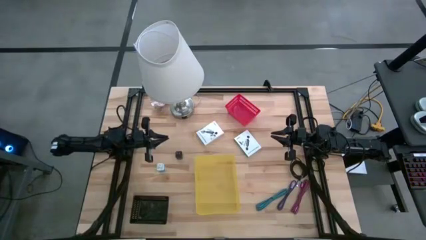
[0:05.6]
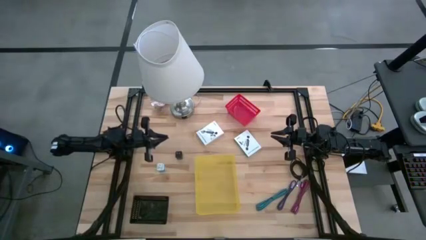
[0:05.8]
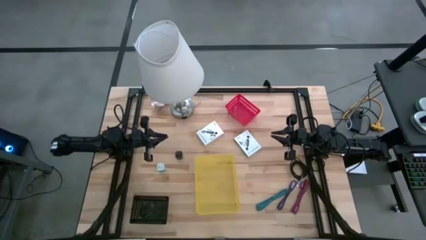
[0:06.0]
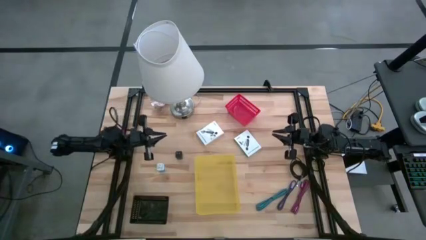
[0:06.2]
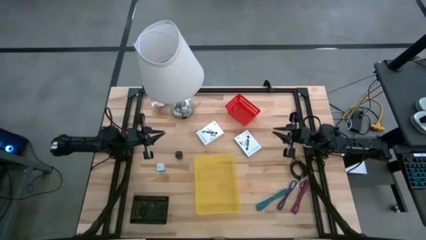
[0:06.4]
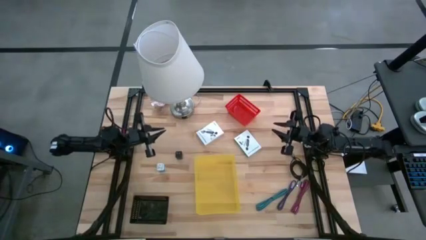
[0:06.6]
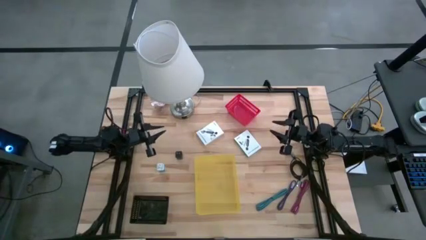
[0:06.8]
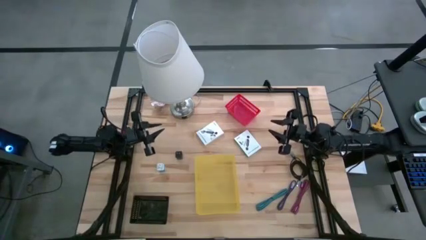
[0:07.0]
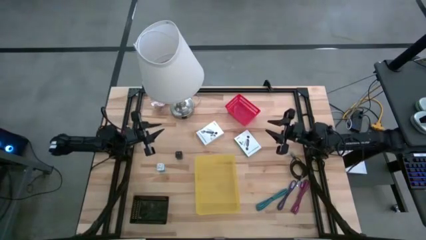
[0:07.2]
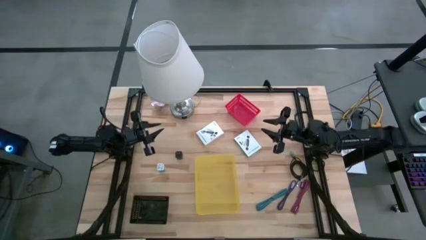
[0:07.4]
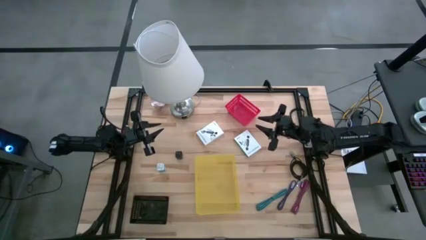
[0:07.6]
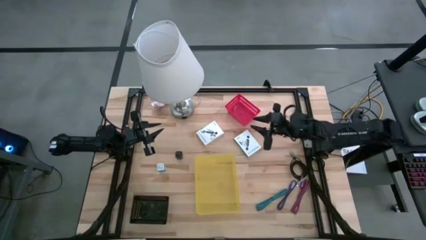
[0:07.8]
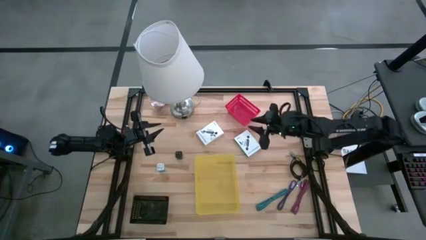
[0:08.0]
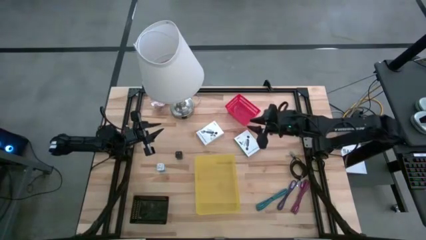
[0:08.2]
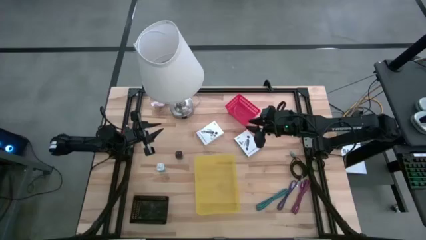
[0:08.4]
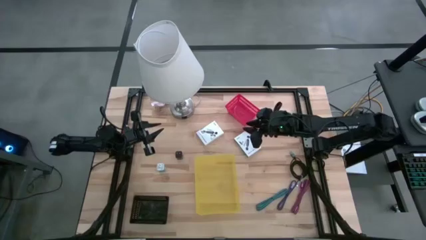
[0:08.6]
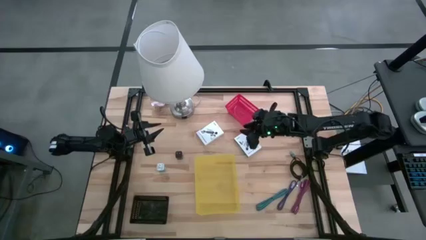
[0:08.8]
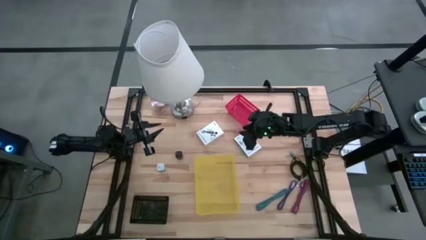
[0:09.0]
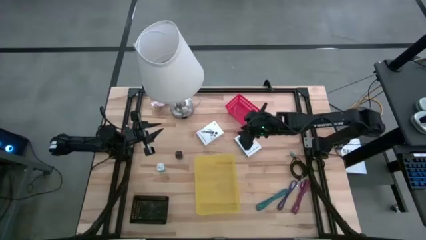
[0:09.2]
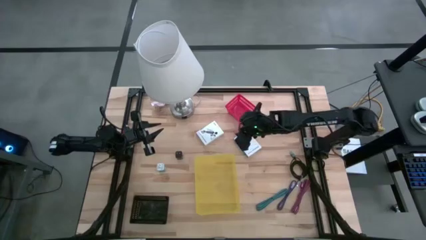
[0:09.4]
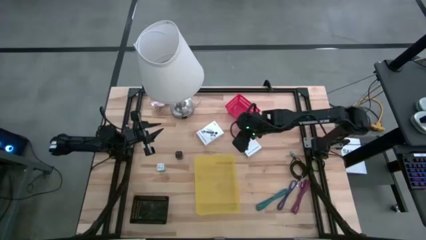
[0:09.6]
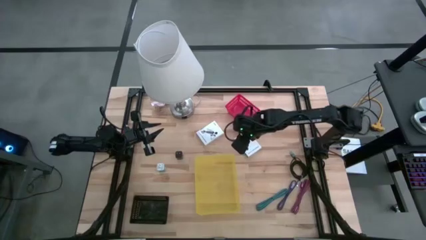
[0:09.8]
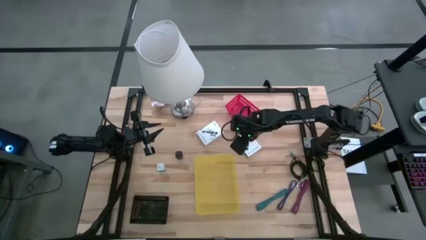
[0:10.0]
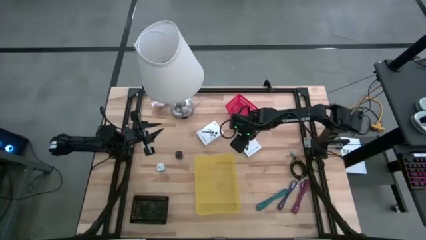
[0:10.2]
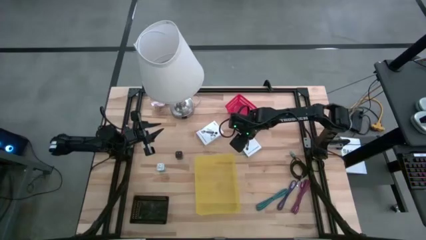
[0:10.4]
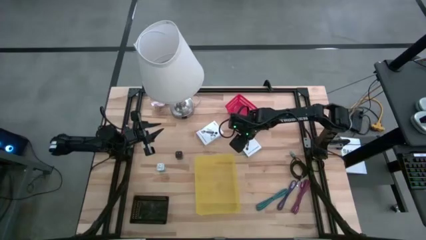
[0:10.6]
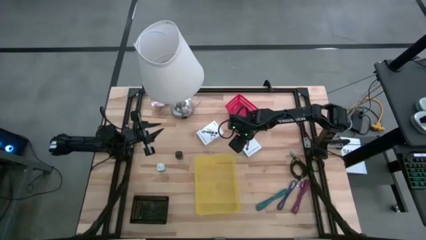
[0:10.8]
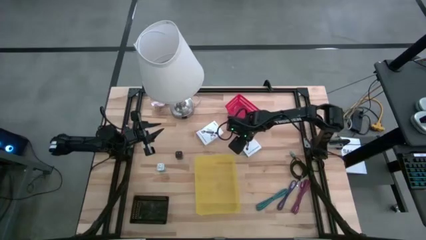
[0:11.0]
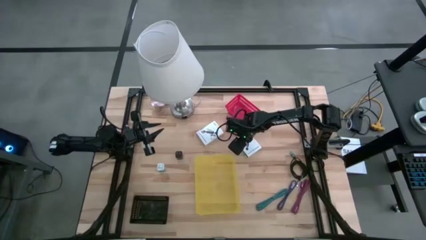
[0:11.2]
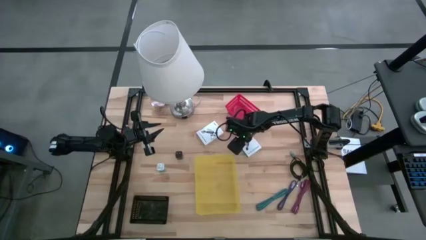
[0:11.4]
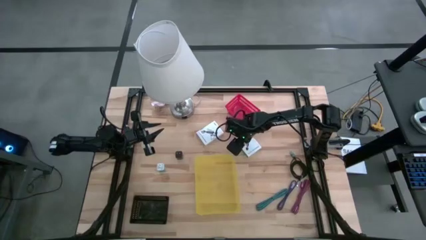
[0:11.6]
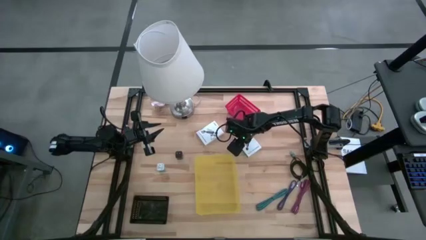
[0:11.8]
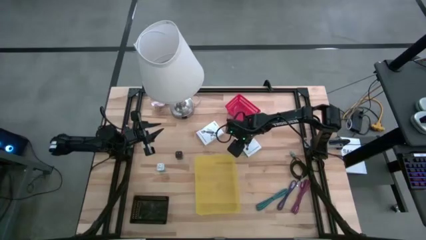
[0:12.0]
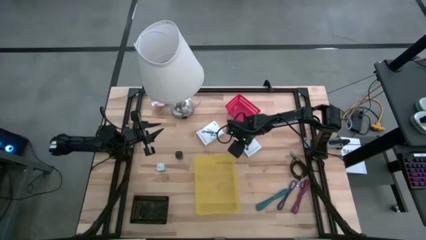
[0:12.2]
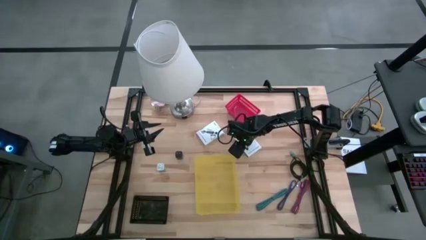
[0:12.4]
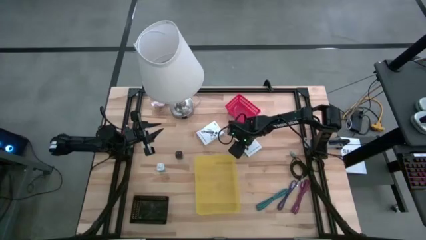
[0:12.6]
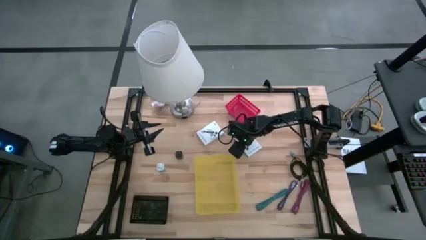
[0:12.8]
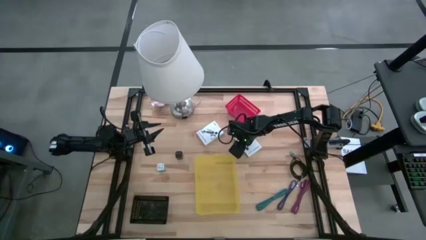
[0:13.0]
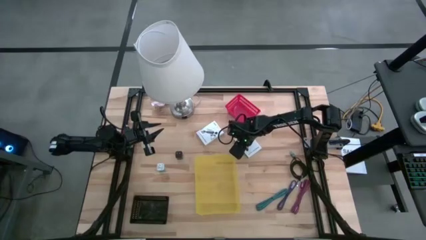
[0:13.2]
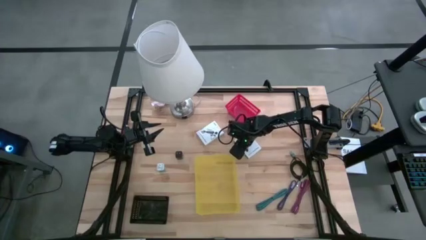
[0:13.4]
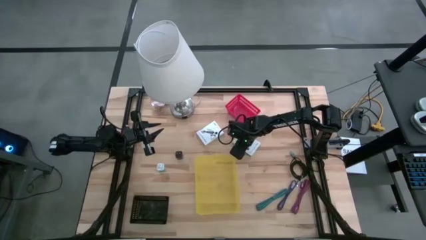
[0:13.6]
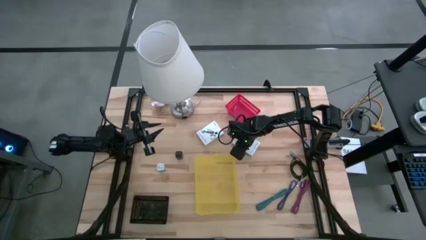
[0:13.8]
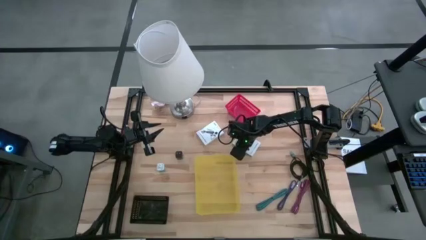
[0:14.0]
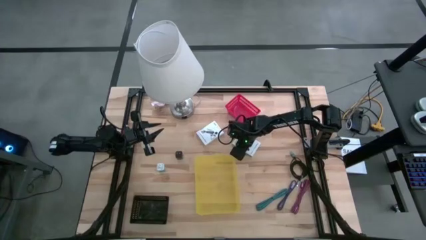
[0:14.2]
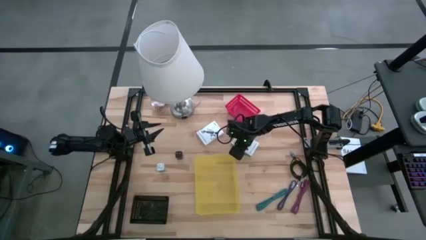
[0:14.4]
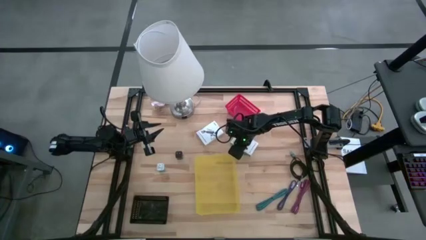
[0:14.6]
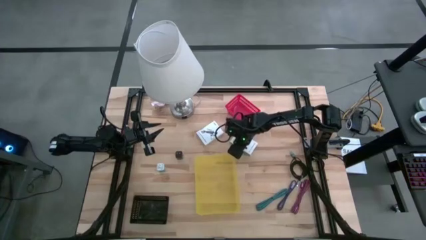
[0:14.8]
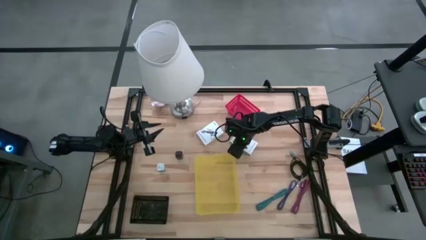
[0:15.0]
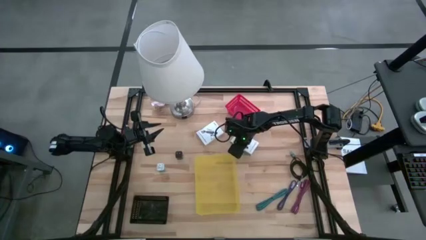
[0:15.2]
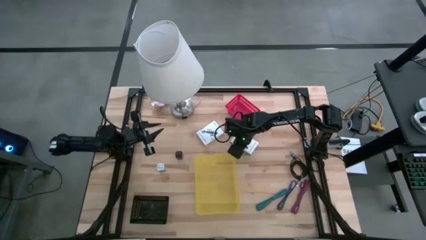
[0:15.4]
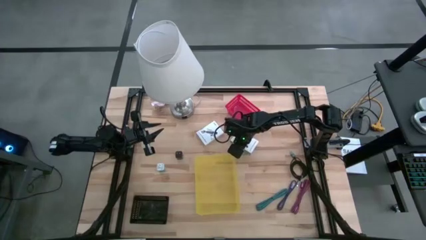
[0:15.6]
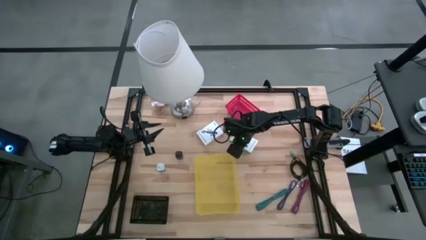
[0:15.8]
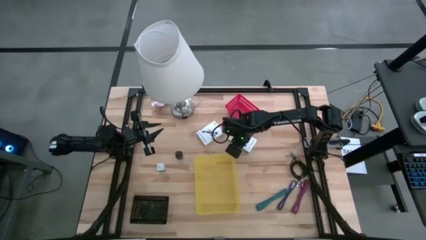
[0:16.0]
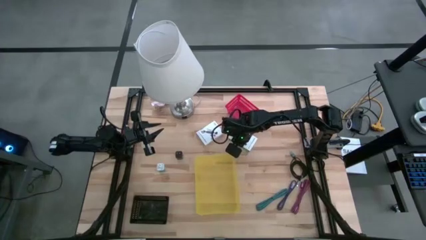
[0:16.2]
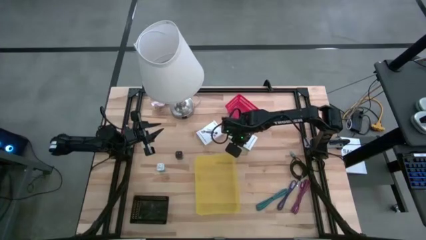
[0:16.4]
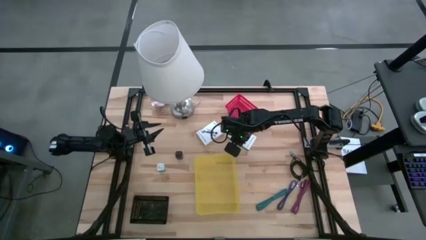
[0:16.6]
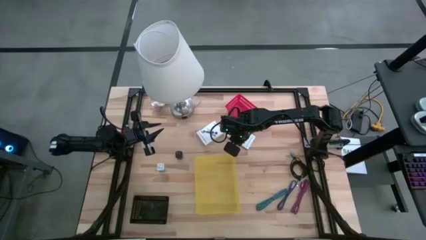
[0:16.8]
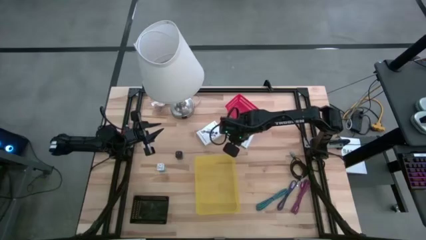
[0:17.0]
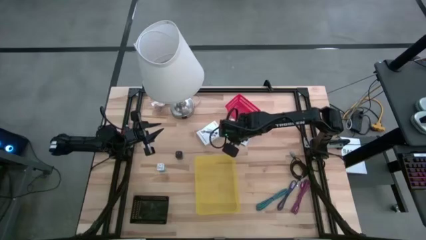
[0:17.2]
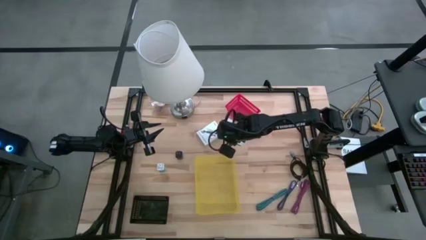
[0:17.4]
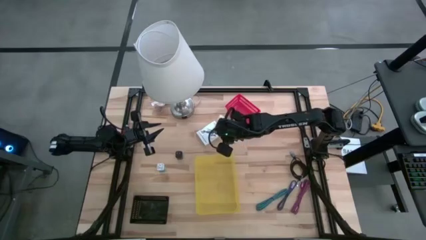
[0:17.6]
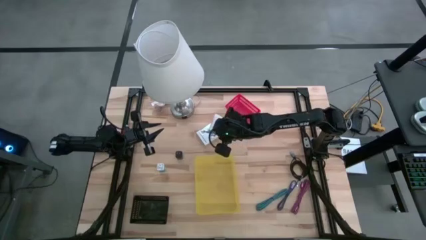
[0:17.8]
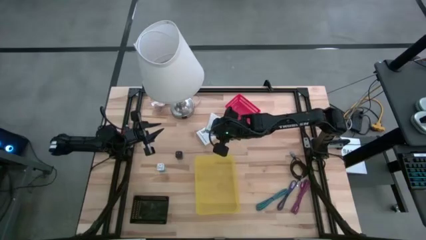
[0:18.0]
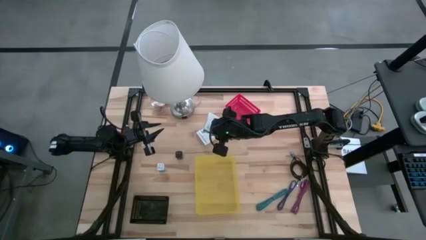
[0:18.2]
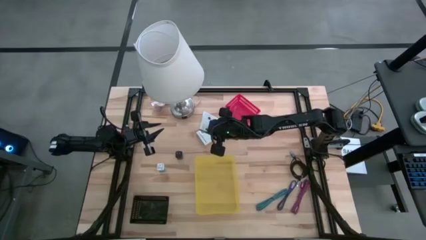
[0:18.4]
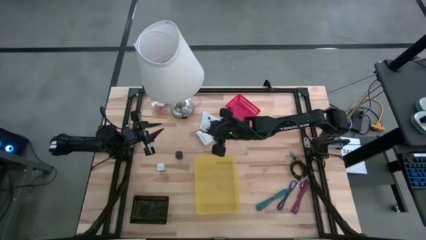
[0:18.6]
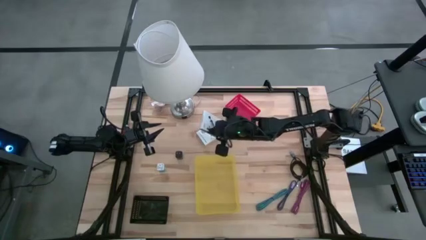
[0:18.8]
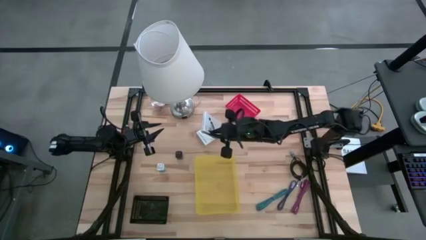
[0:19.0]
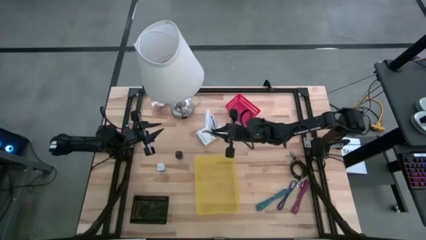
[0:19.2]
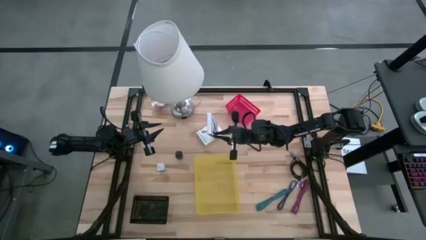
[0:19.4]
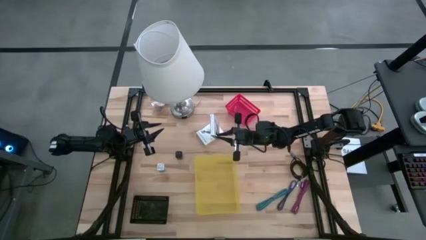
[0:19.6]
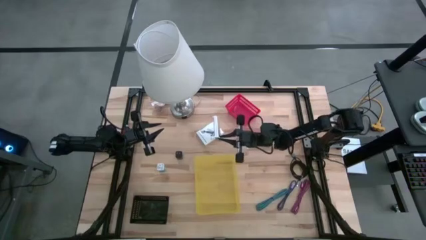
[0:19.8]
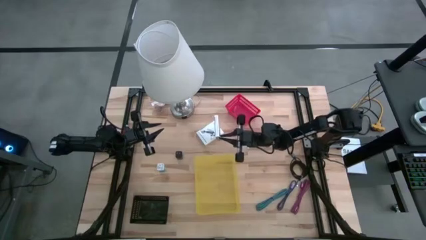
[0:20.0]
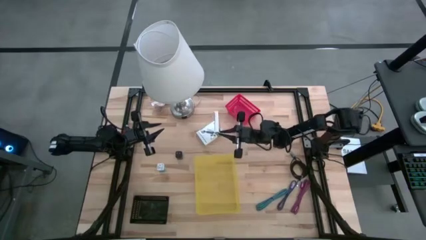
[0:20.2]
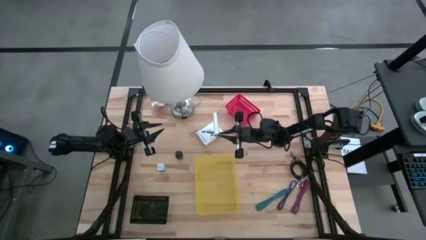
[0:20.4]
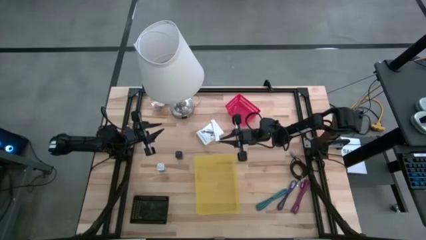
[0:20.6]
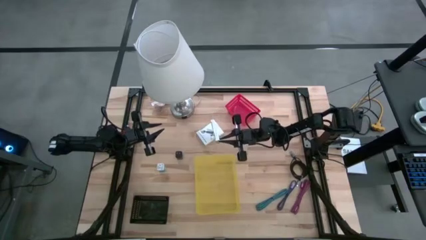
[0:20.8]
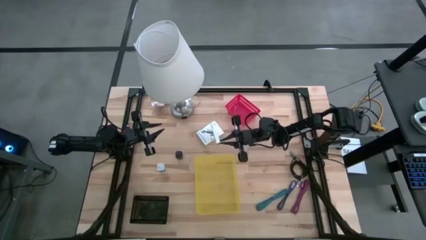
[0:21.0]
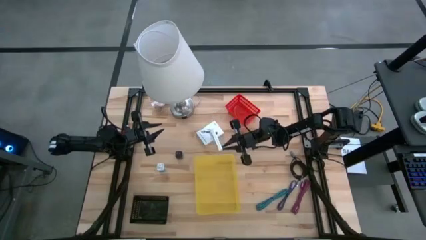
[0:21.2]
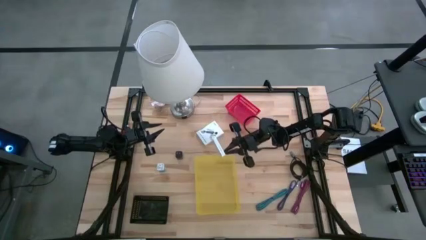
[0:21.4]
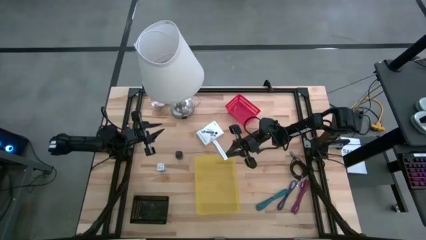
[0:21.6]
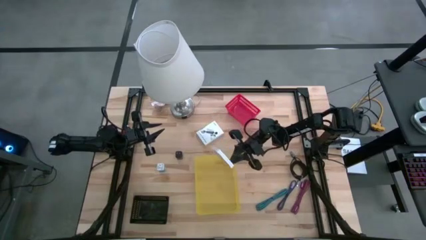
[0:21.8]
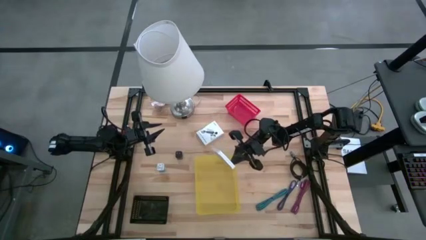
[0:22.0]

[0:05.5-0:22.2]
Task: Pick and place items into bin
Put the right card reader box into the black bin
